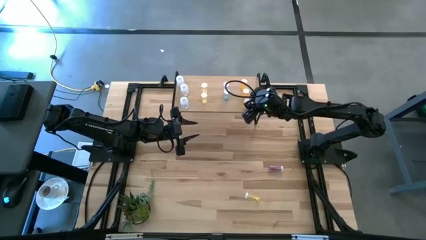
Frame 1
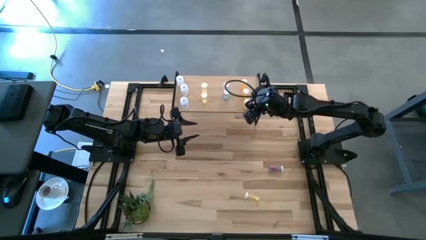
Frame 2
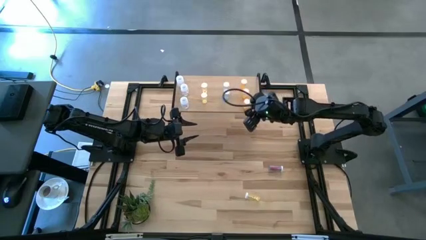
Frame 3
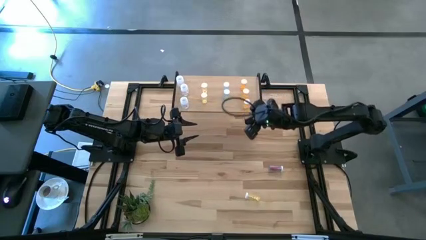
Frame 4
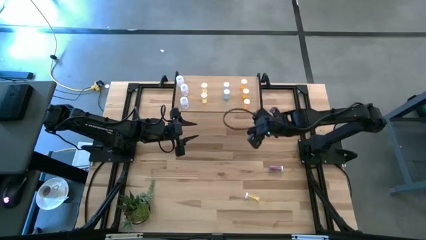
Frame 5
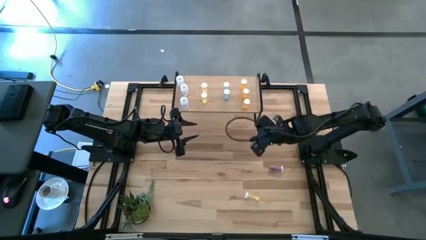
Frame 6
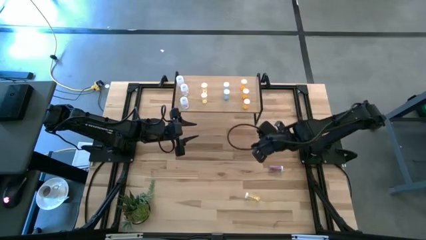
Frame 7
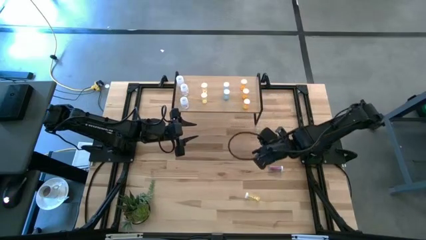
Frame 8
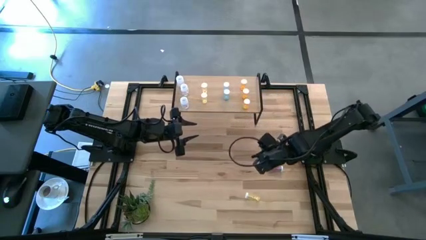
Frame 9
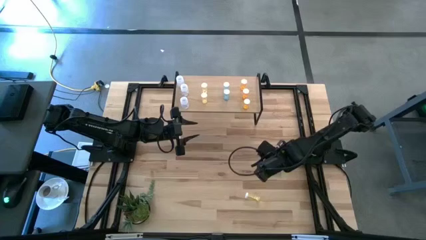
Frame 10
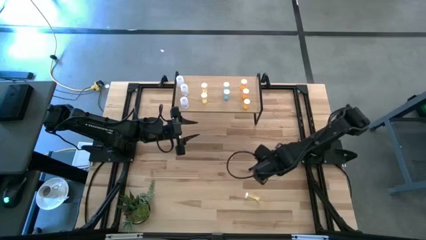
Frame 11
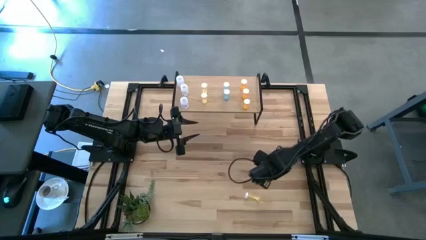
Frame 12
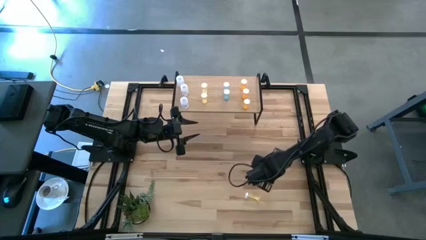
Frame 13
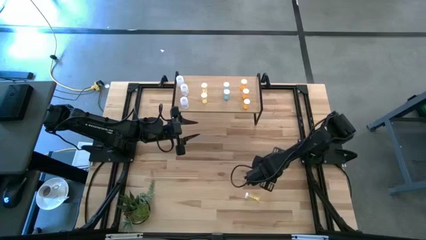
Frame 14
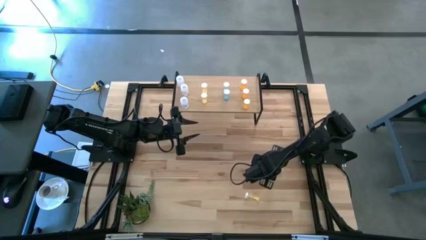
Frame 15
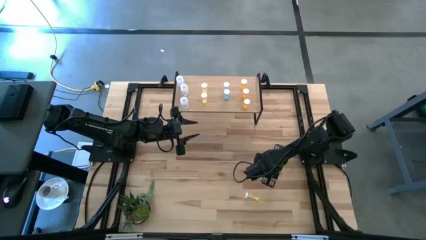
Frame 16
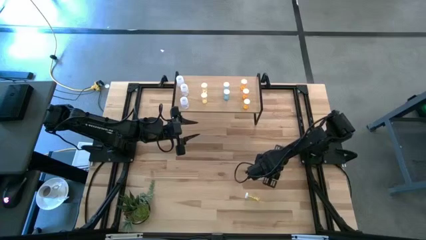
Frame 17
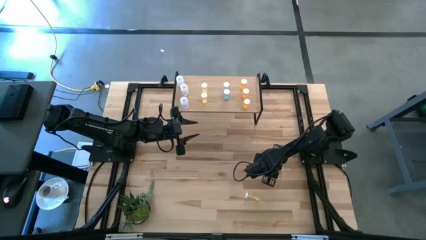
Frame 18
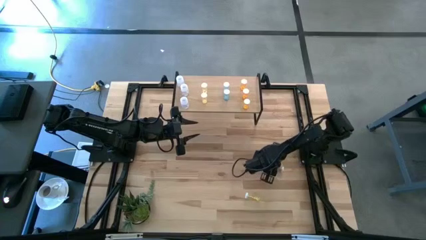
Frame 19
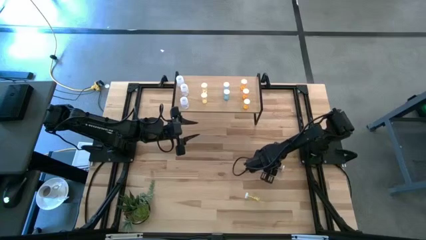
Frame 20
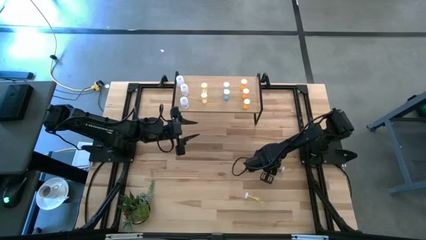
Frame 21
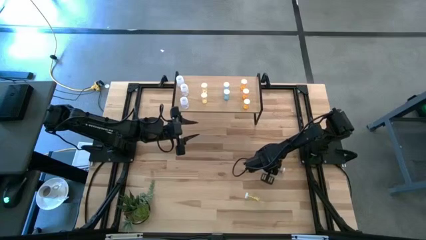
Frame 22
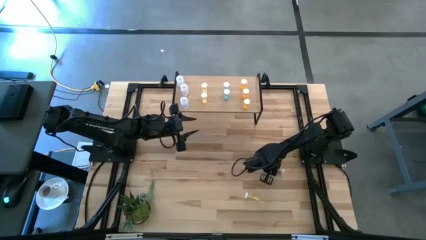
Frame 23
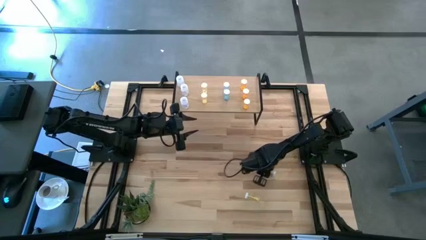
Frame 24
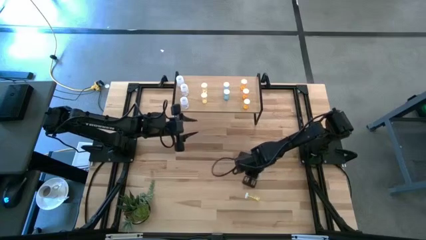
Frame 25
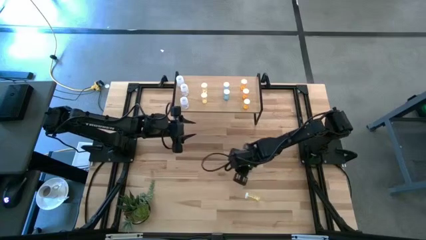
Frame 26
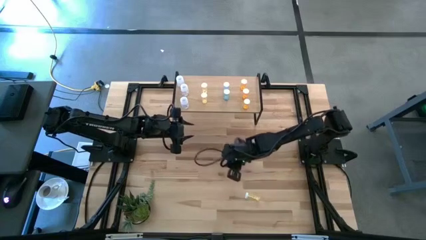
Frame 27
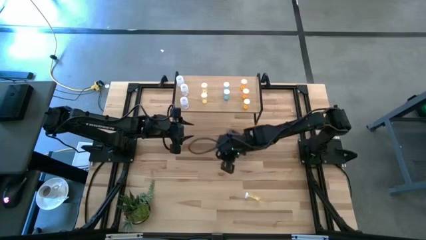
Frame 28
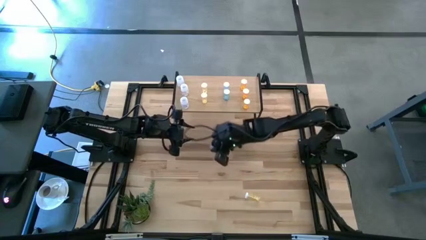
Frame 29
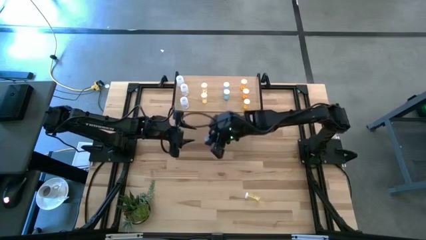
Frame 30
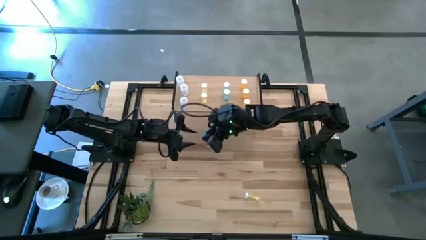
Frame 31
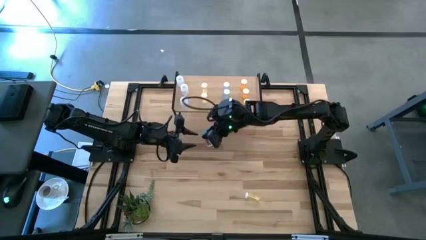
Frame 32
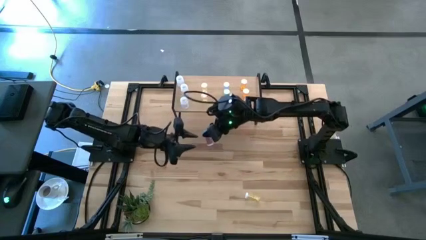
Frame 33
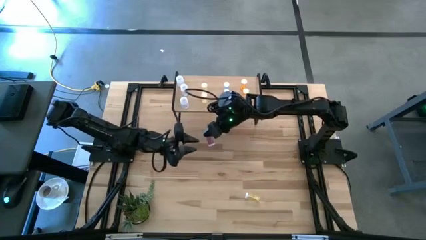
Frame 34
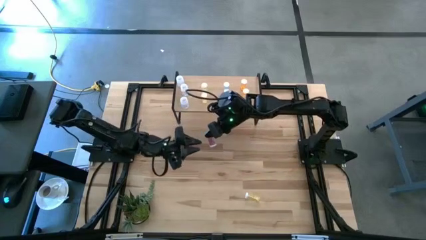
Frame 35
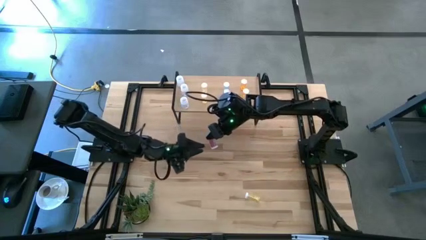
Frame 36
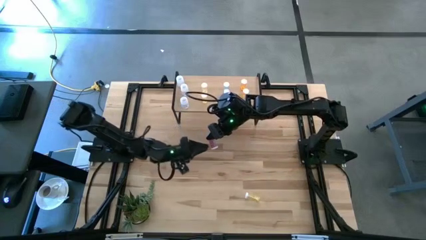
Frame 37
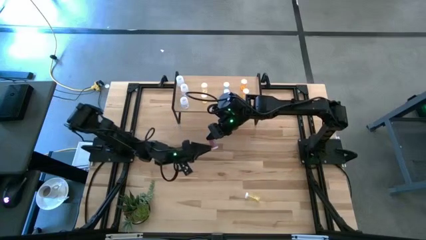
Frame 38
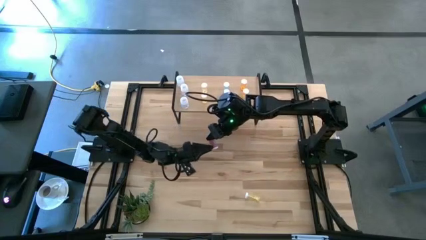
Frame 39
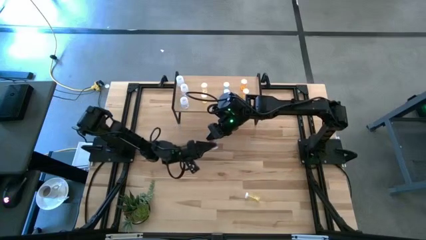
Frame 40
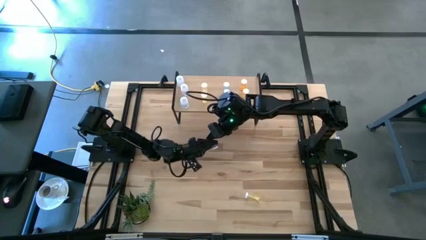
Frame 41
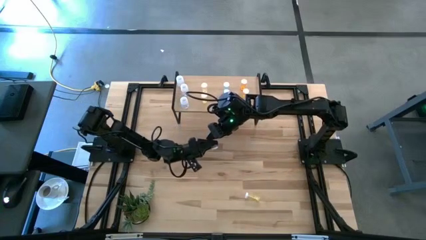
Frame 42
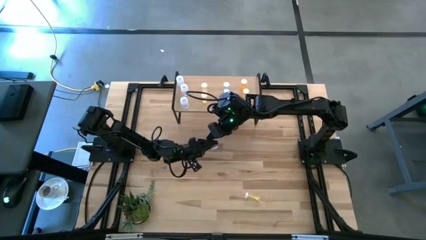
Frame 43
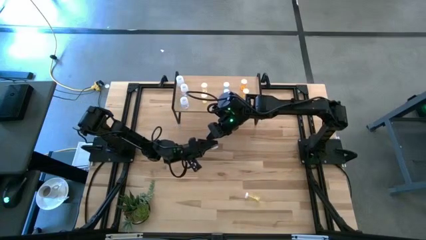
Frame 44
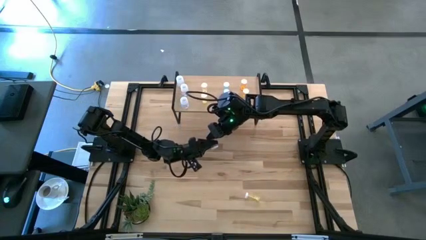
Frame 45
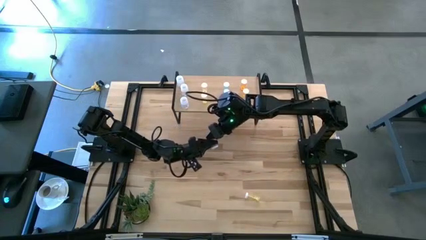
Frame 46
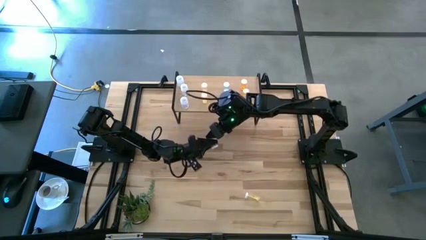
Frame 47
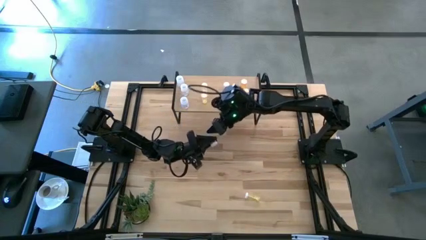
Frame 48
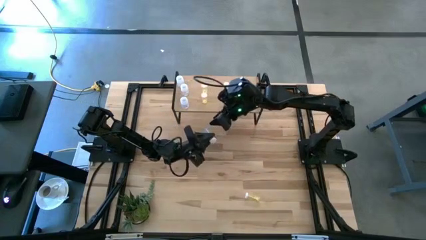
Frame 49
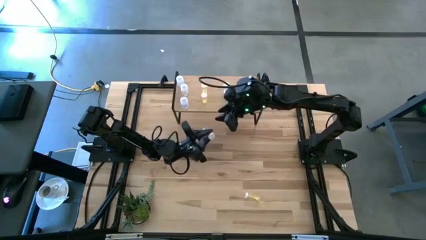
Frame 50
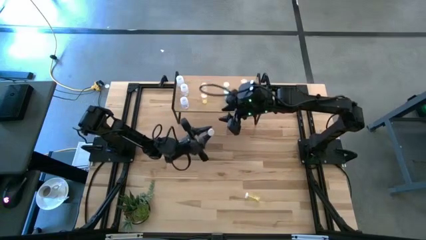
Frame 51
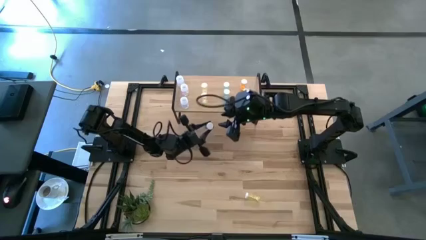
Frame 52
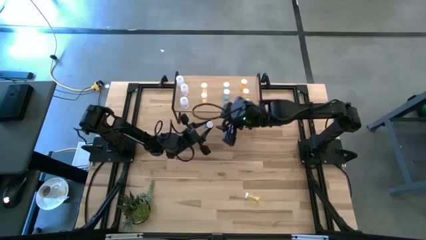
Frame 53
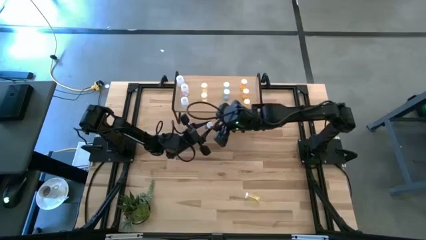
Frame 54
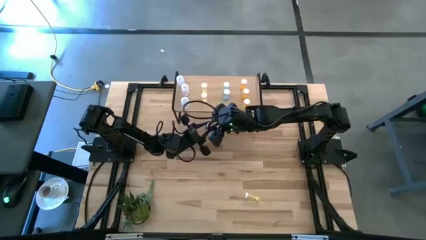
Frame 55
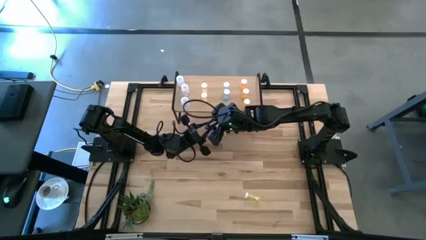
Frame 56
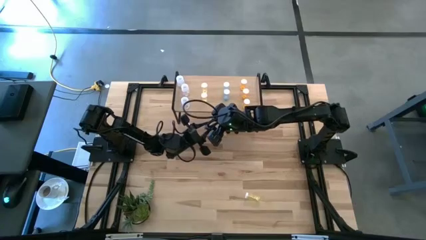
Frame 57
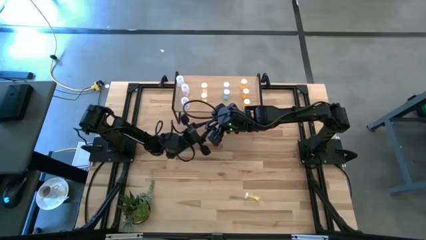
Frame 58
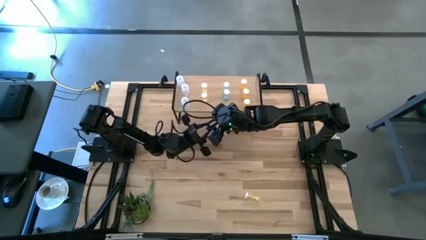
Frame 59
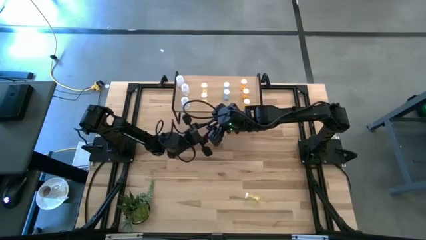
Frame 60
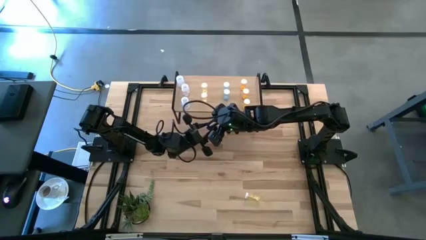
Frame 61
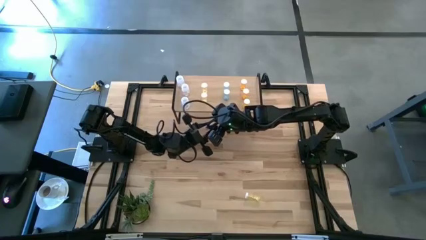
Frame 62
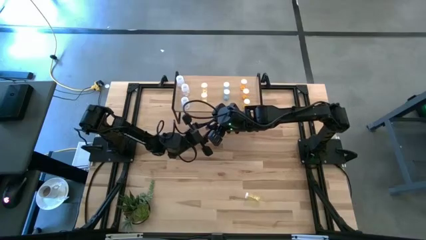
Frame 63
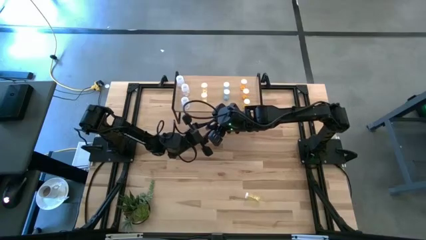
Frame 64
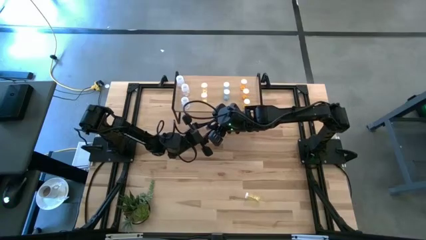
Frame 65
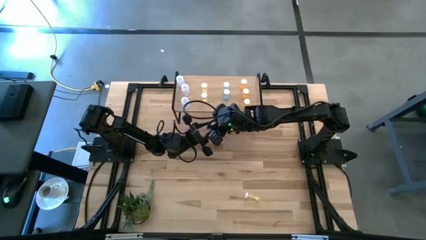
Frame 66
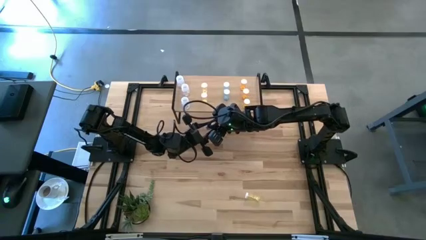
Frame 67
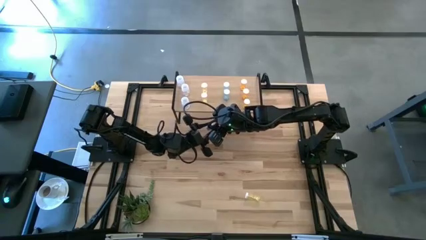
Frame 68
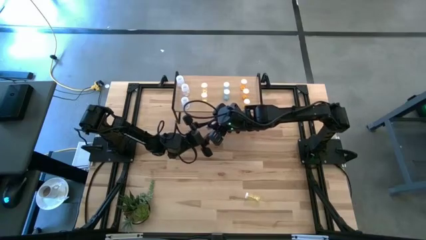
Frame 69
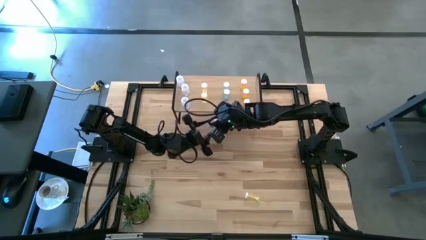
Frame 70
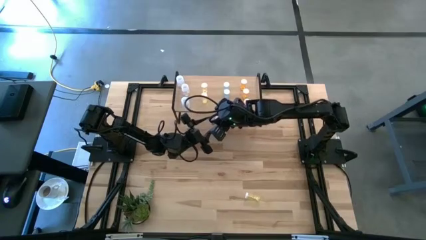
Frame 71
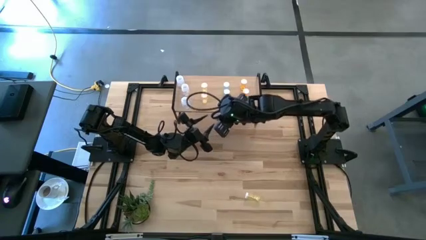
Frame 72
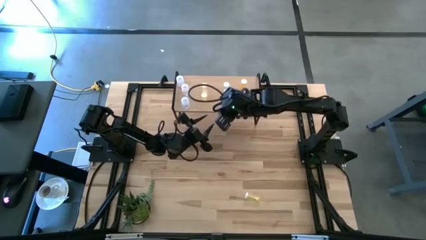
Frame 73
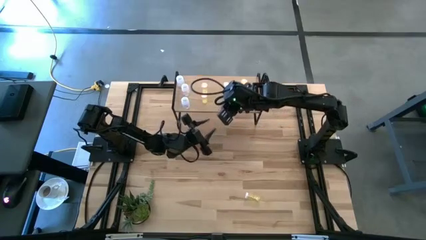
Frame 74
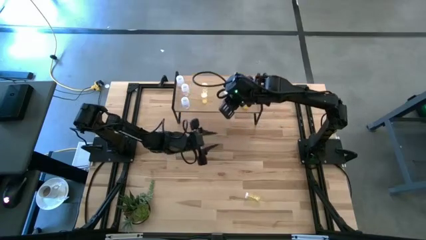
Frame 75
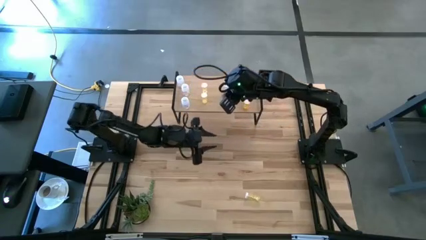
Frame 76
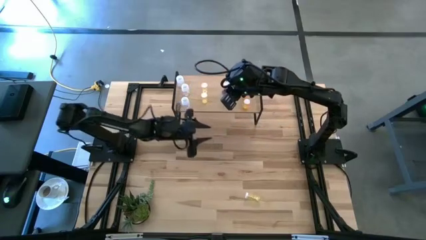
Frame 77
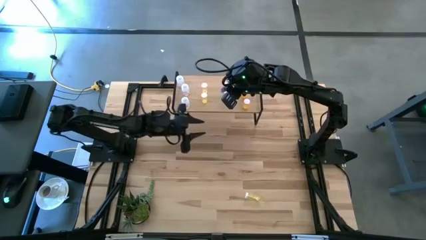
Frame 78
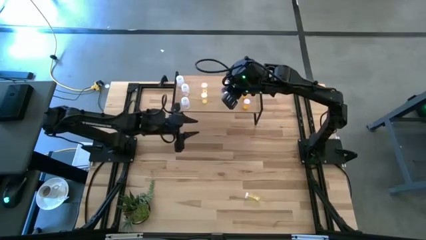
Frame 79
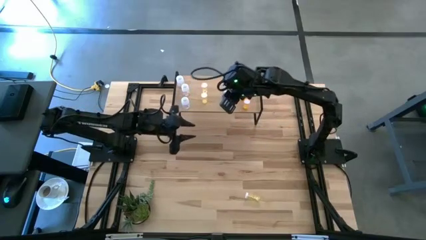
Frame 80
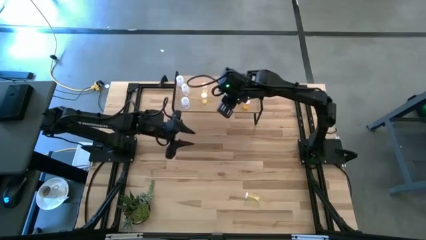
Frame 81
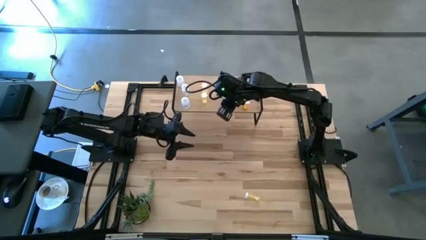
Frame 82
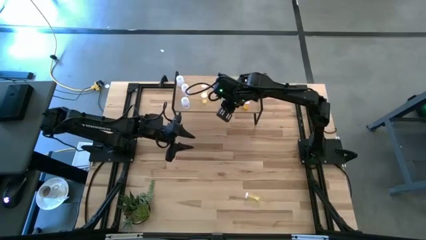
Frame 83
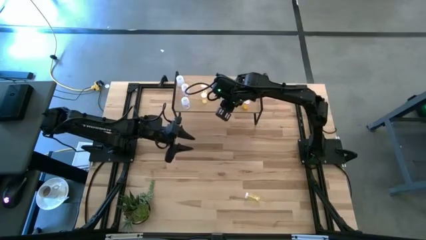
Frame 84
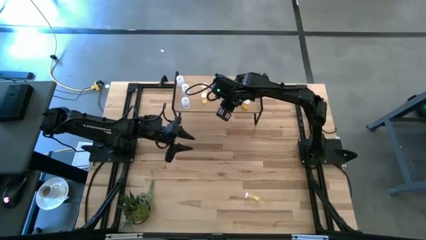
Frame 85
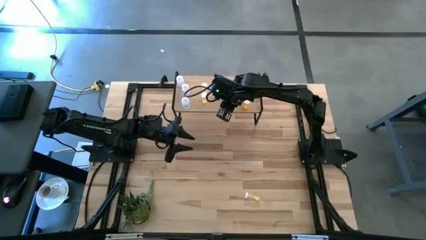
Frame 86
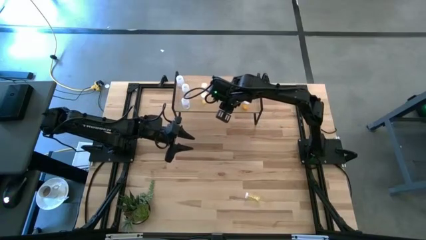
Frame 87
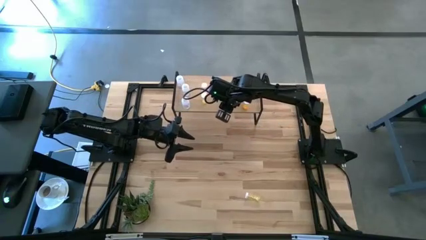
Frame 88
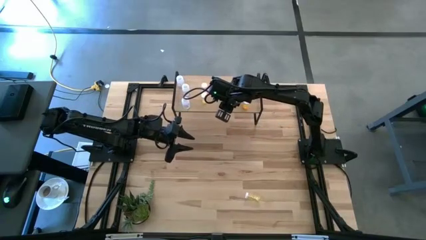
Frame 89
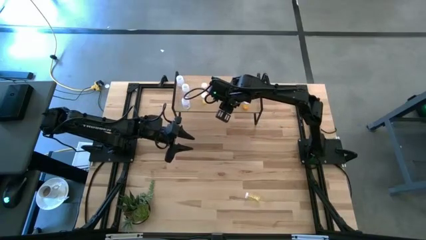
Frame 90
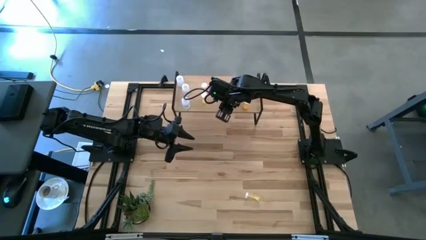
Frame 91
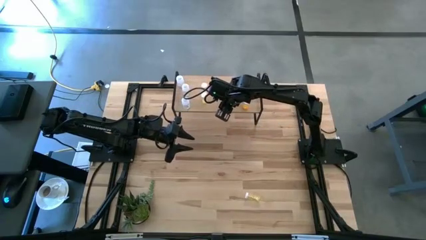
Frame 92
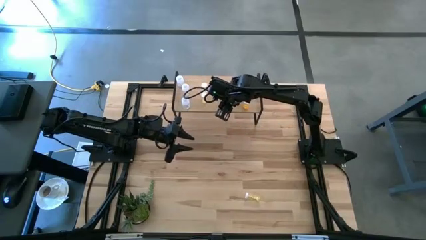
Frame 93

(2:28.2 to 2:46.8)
Task: Pick and place medicine bottles onto shelf by color
Put the blue pill bottle on the shelf aligned with the other blue pill bottles
